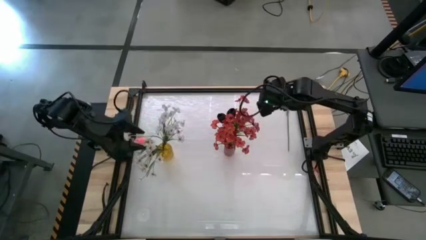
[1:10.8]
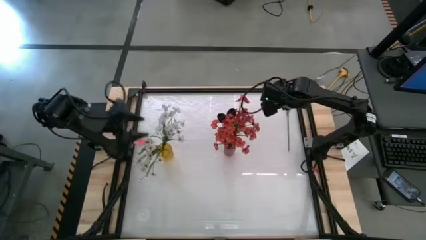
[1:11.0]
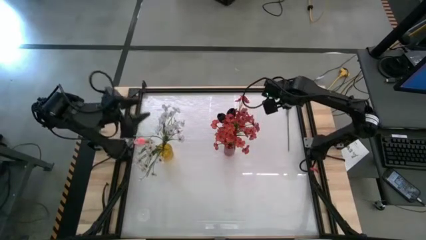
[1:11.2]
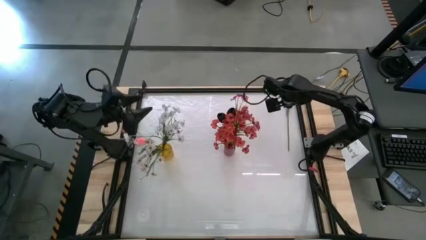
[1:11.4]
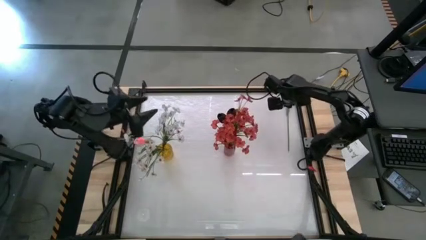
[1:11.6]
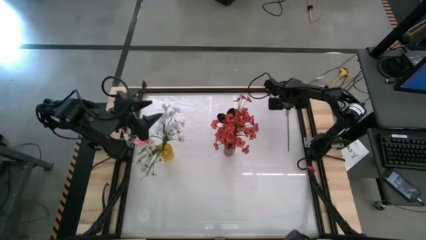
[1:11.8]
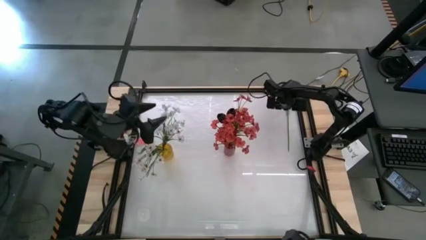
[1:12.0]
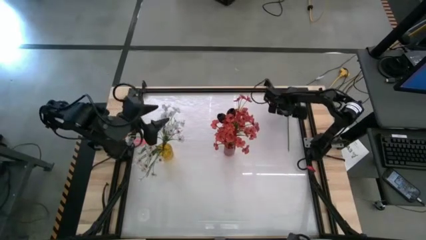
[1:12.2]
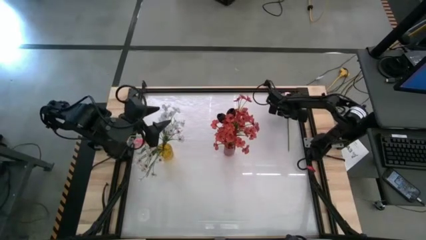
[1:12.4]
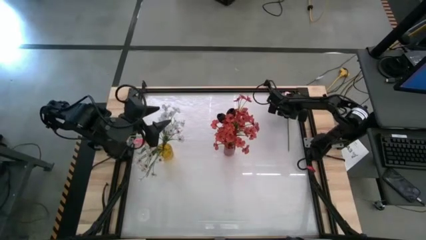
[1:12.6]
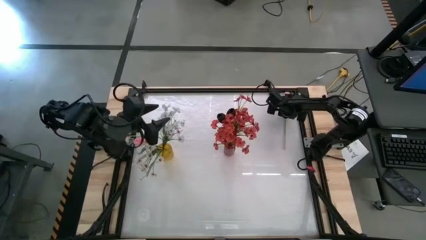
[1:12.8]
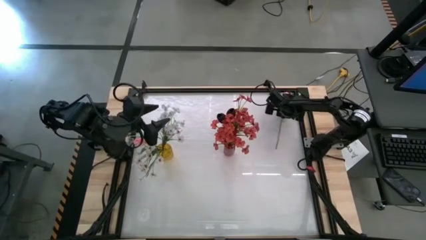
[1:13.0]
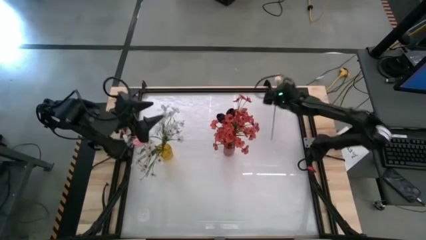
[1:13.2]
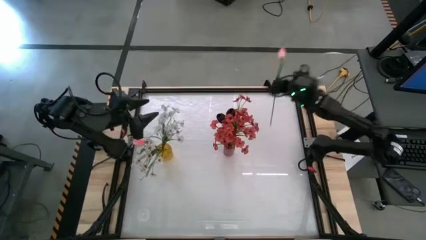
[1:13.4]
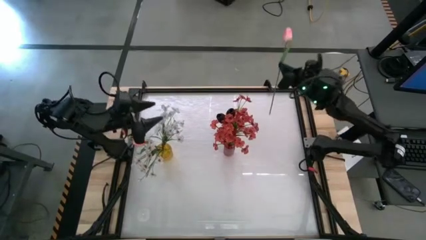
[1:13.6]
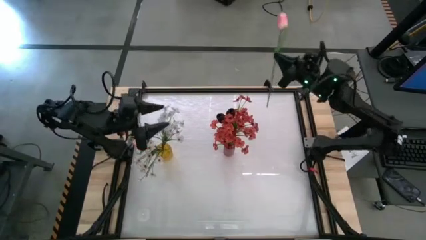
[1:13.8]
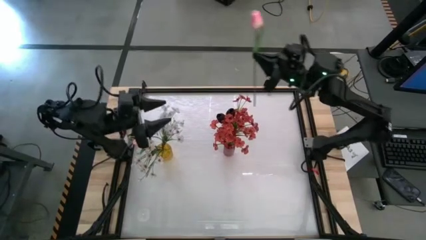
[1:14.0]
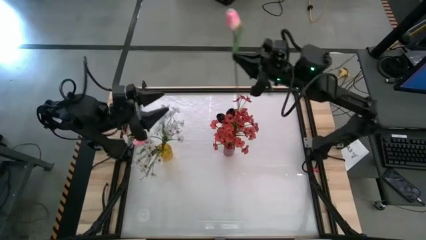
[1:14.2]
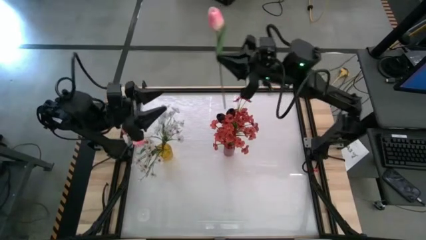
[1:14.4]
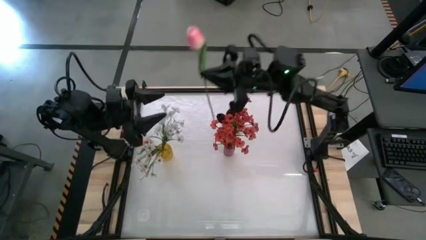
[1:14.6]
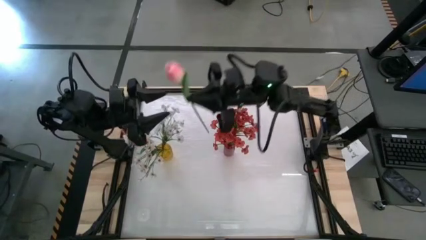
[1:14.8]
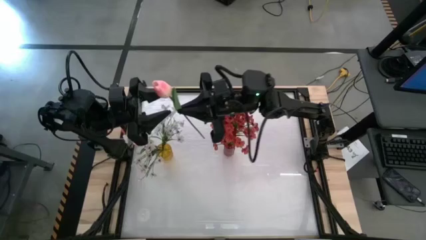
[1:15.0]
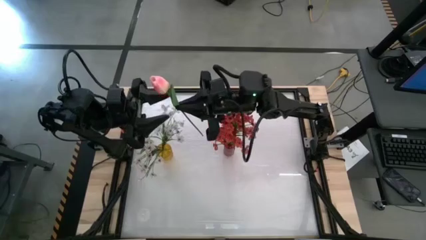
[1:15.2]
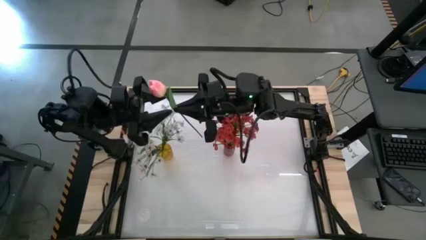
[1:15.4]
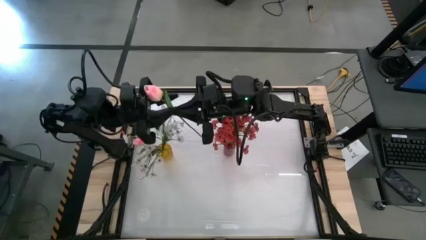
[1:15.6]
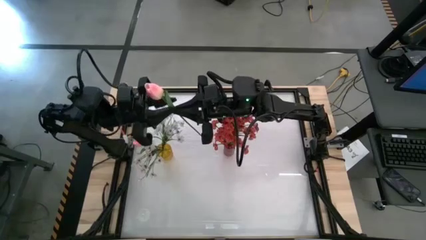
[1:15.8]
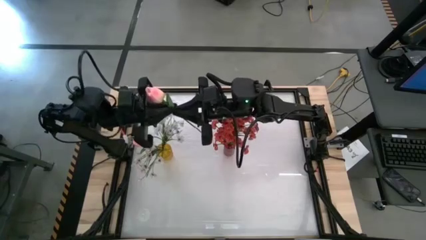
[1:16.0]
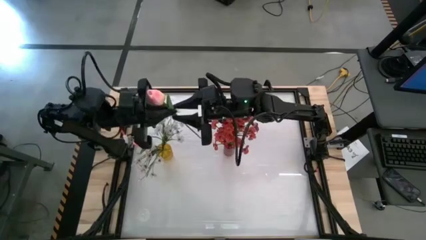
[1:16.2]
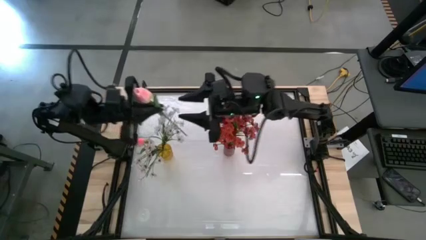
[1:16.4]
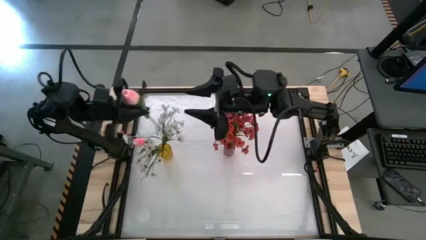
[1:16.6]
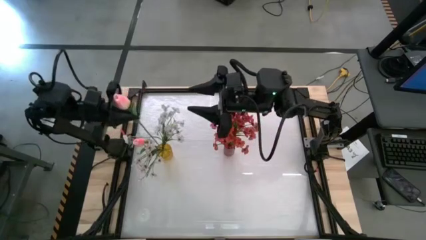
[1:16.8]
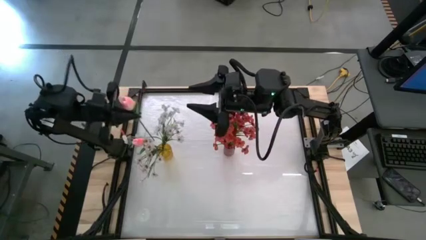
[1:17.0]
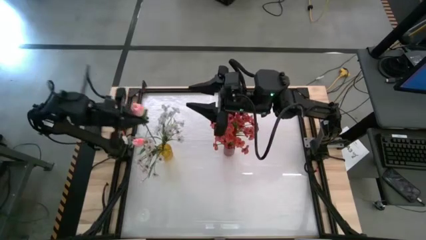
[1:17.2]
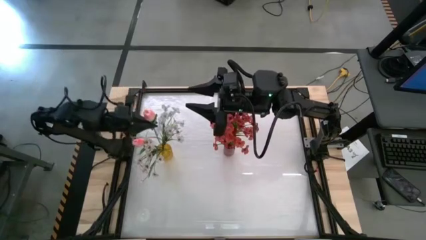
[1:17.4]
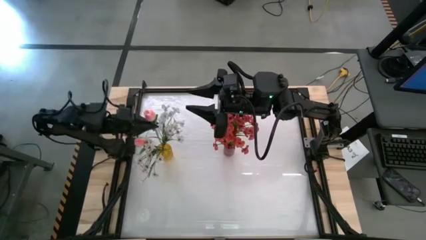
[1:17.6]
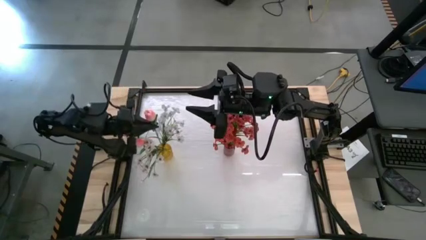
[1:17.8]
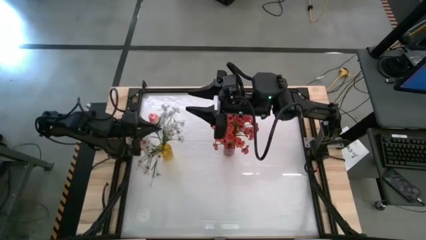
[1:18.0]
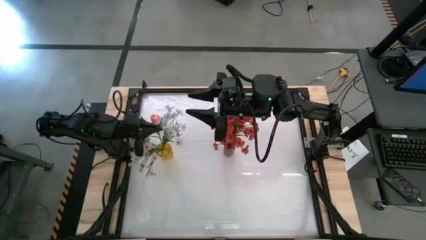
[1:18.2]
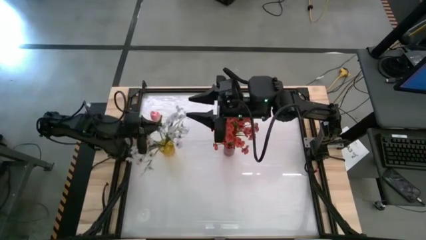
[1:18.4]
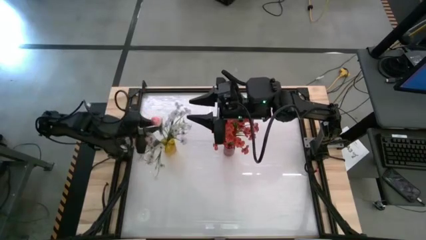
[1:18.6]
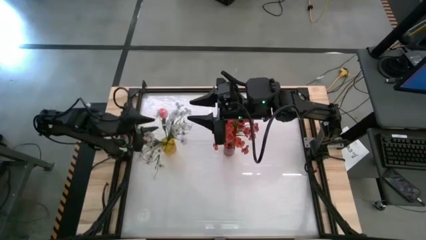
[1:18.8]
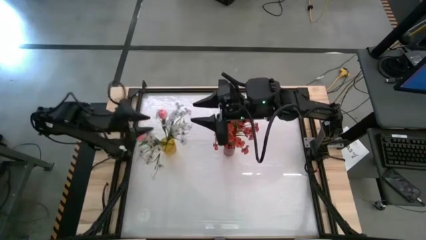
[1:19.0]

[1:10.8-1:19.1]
Task: Sort flowers into vase by color
Put the pink flower into the yellow vase

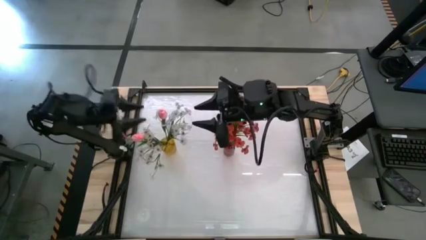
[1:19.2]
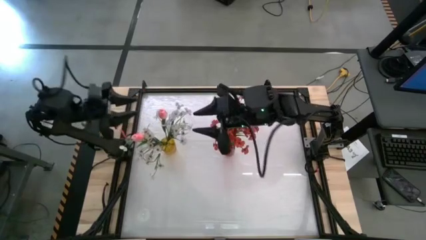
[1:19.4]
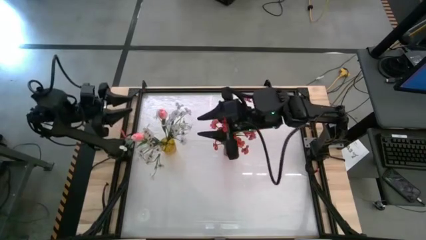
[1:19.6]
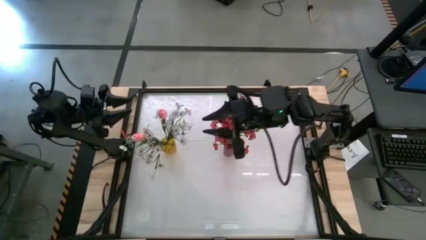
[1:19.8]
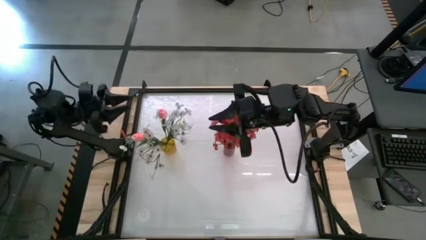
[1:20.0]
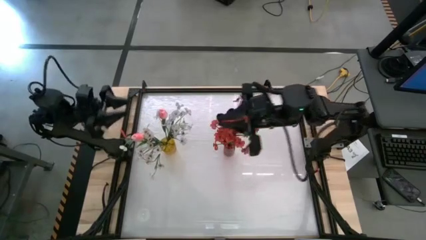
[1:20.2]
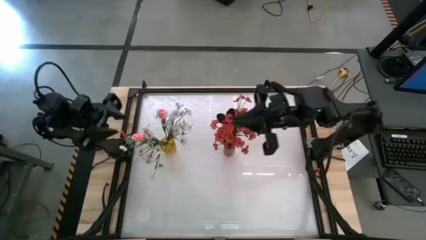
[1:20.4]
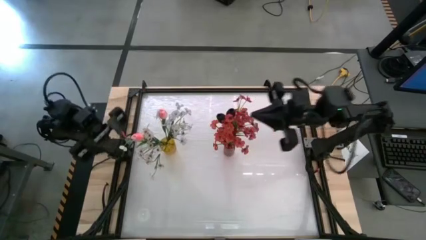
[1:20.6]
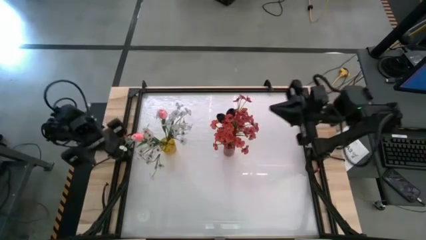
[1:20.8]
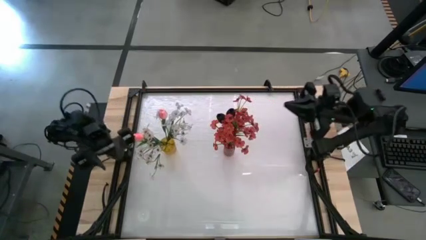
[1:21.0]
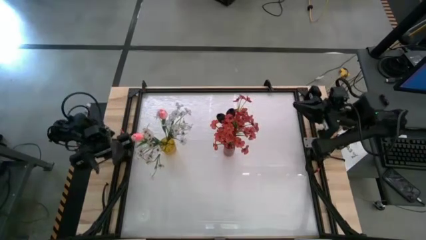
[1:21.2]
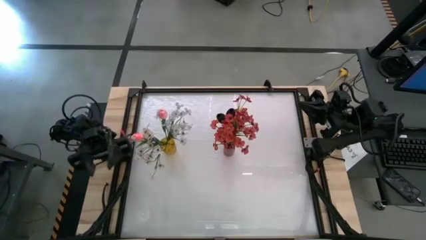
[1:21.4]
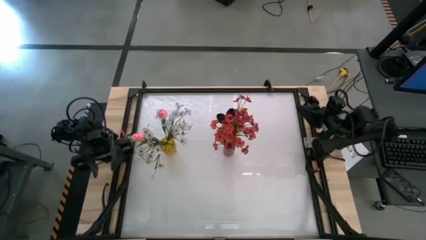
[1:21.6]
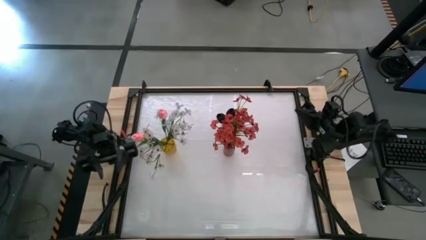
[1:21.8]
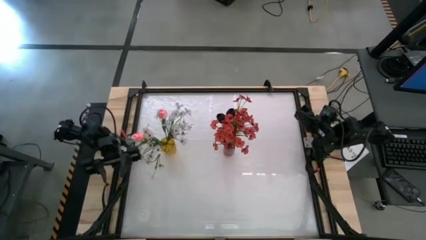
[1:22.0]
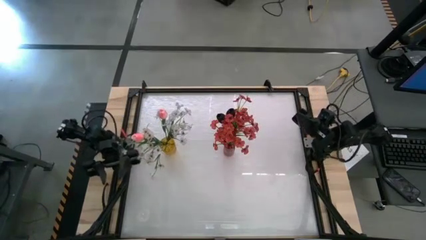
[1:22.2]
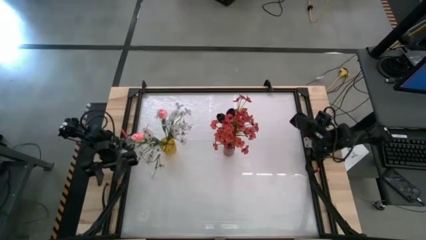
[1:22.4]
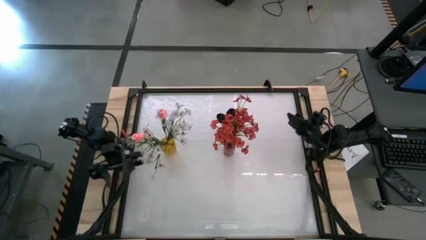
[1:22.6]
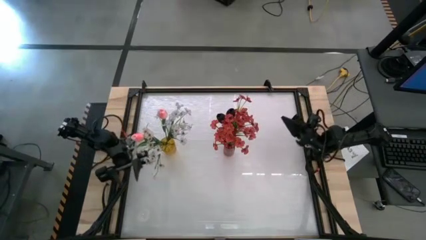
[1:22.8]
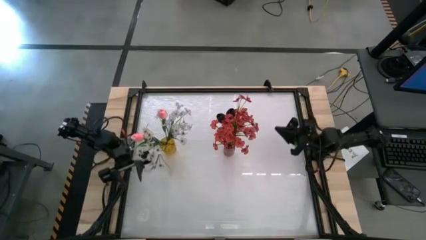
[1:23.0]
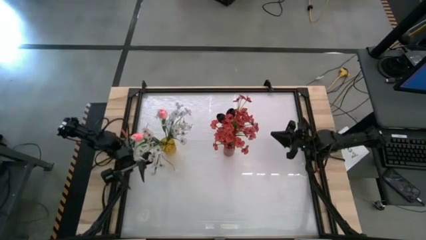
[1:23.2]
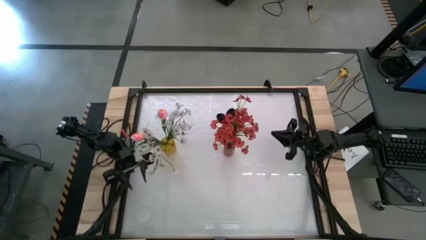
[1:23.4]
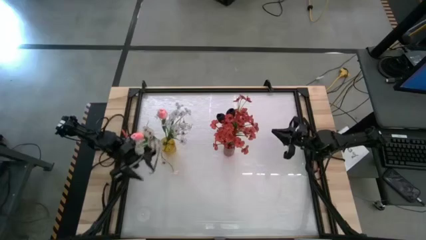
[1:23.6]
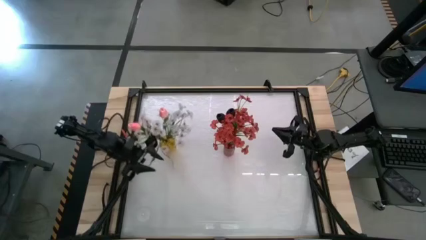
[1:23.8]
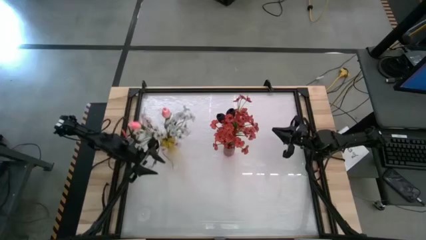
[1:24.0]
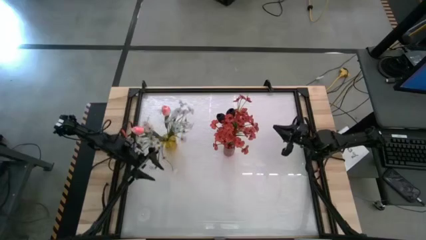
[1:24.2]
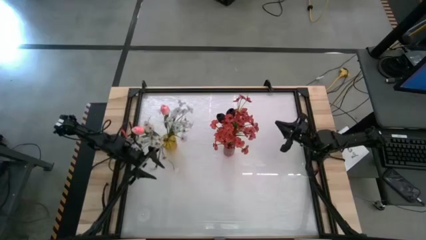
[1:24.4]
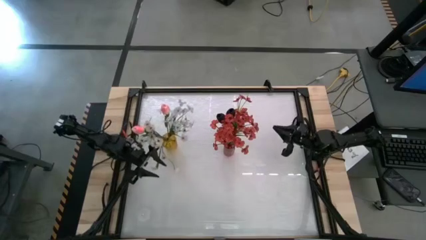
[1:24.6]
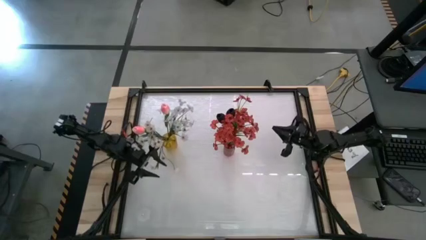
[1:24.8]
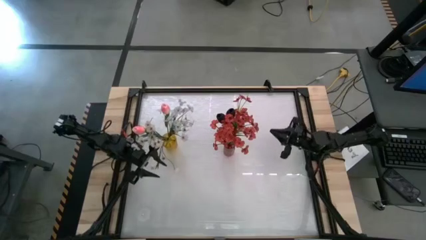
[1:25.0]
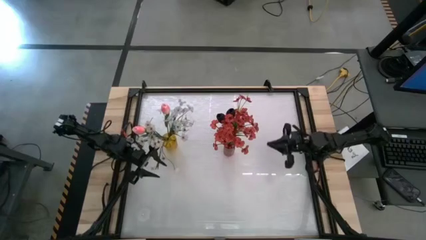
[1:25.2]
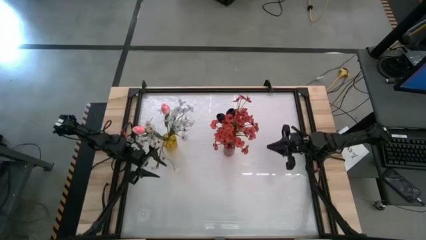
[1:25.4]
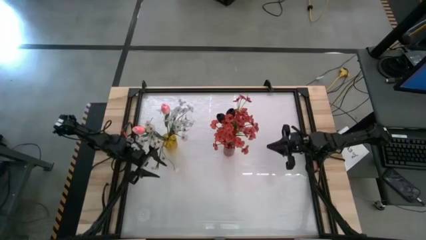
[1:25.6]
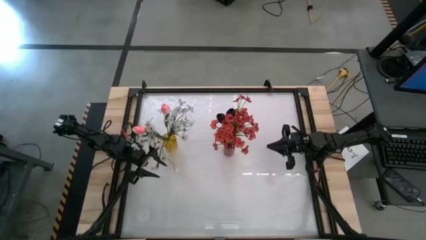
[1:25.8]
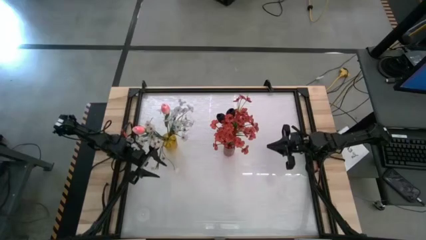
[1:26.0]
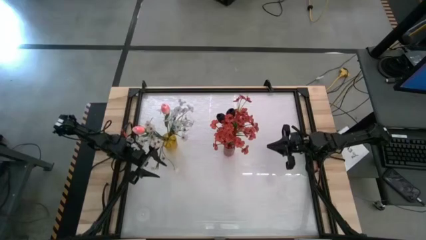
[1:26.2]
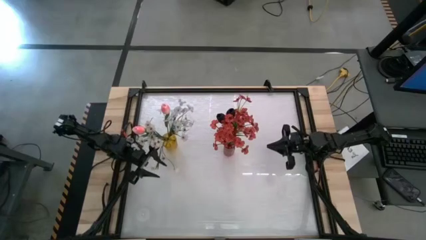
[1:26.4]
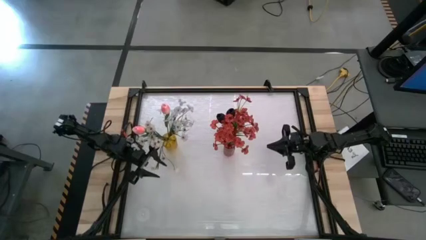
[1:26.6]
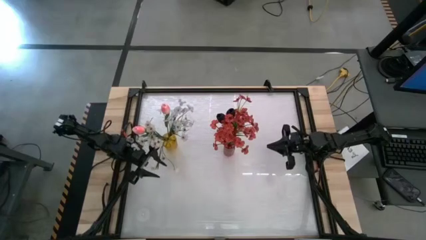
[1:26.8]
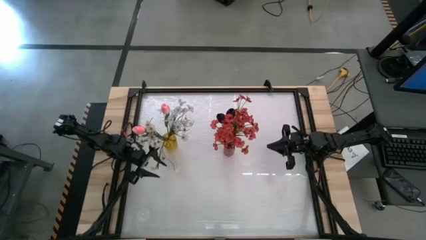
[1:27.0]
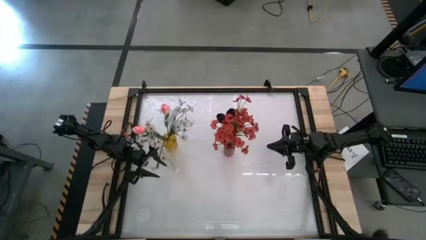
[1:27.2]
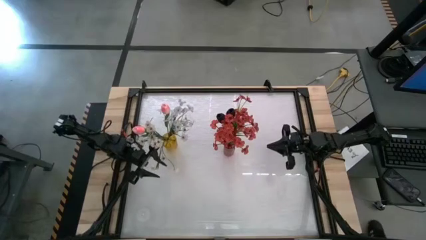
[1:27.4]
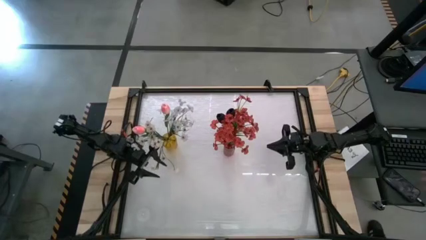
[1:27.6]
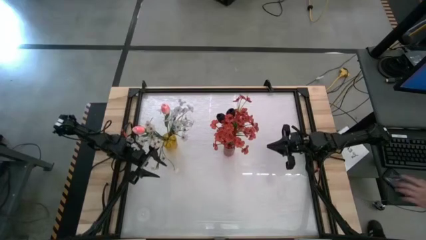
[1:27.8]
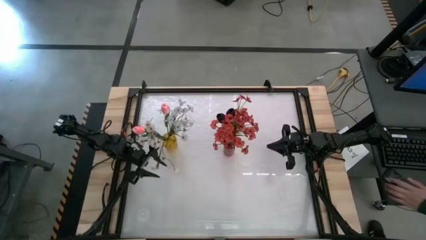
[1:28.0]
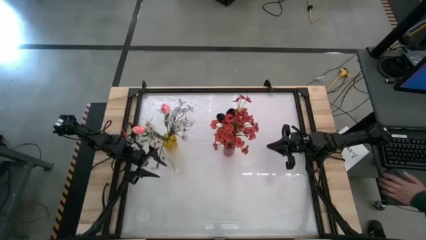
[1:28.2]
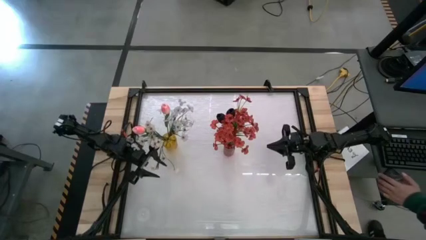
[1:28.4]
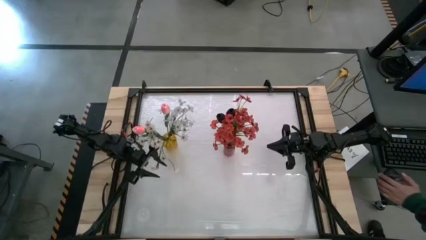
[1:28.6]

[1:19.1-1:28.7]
Return to Home Position
